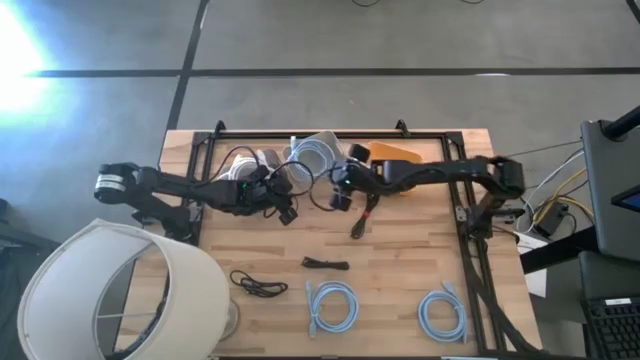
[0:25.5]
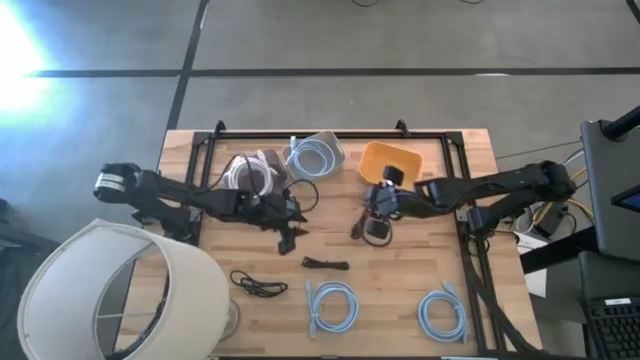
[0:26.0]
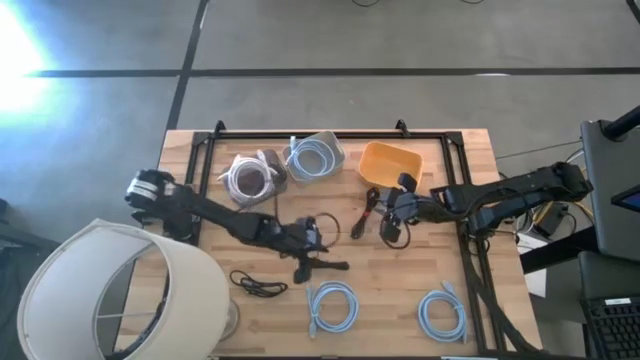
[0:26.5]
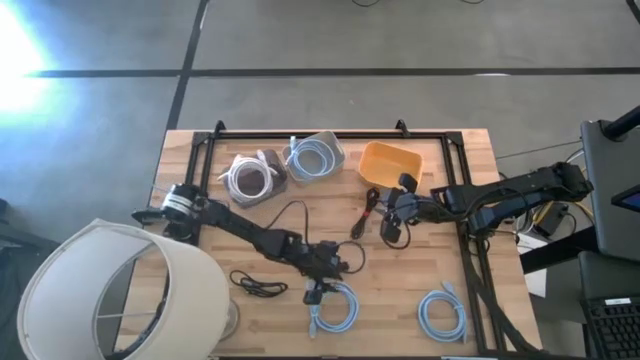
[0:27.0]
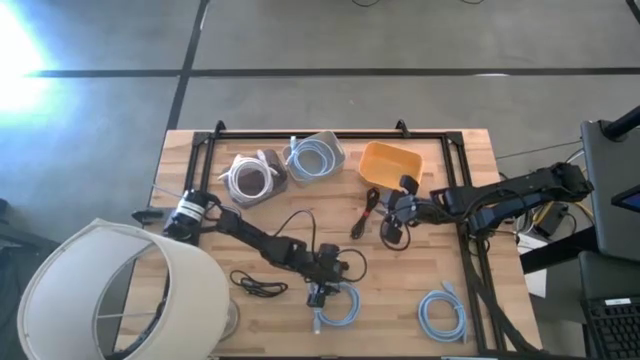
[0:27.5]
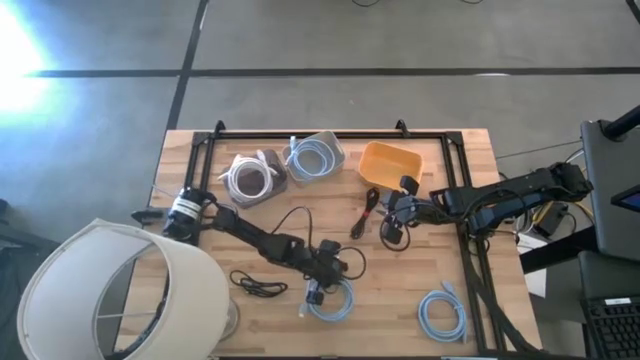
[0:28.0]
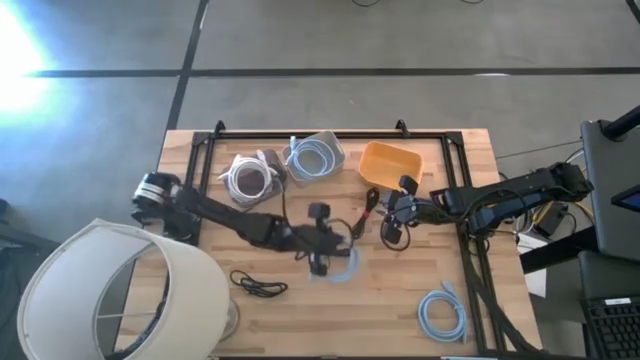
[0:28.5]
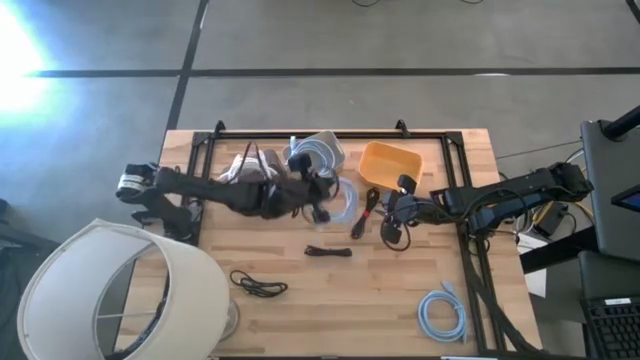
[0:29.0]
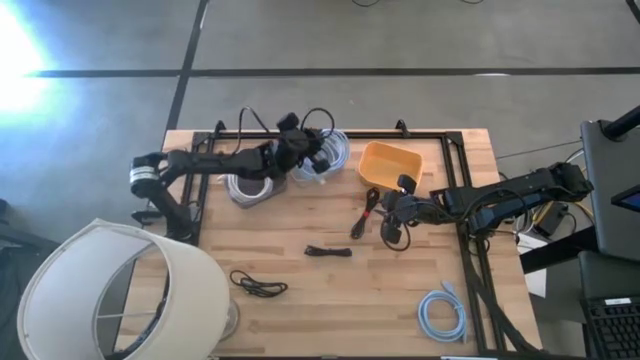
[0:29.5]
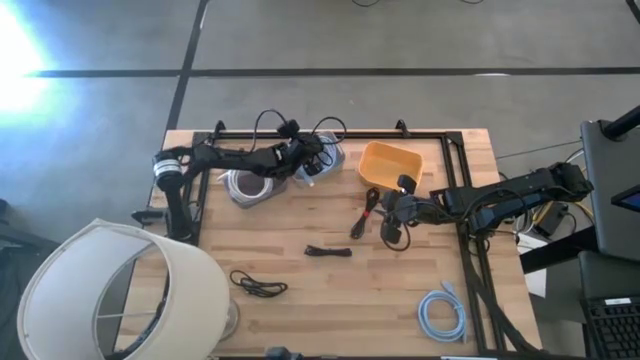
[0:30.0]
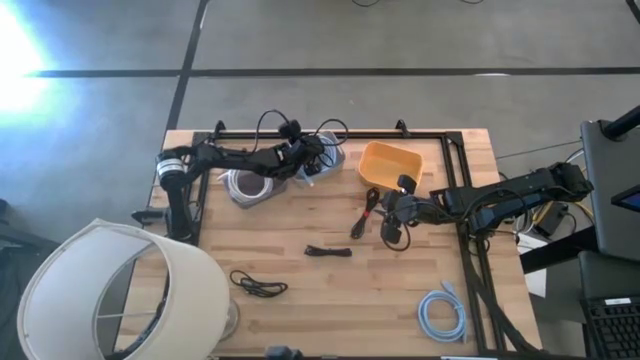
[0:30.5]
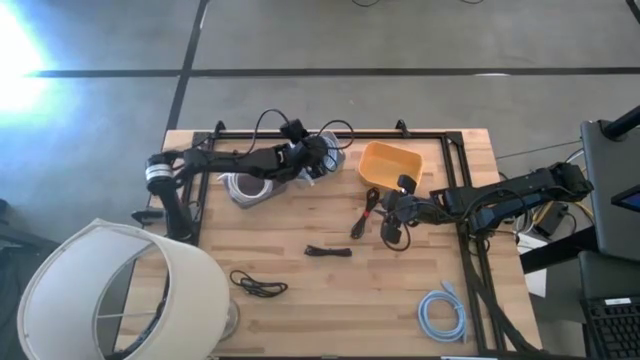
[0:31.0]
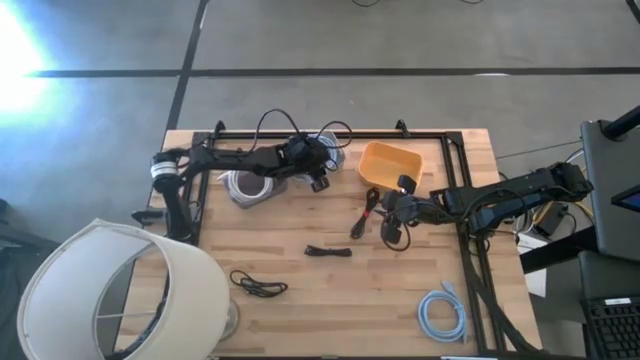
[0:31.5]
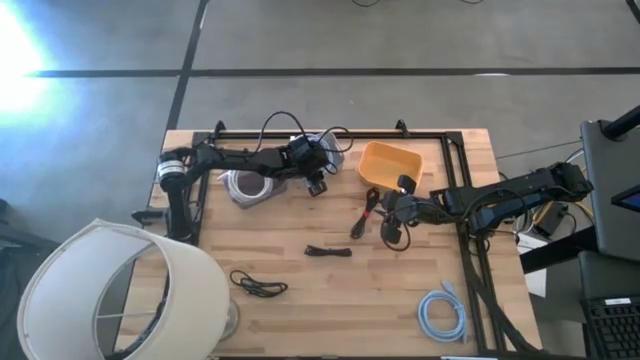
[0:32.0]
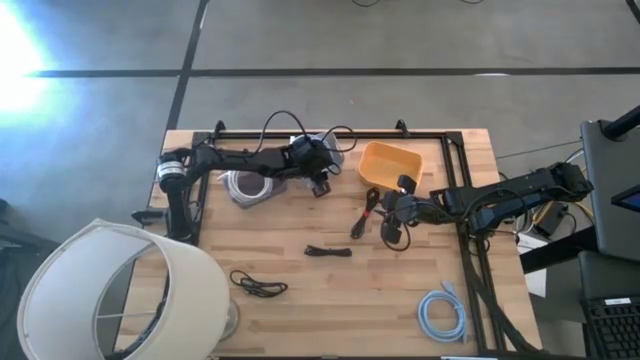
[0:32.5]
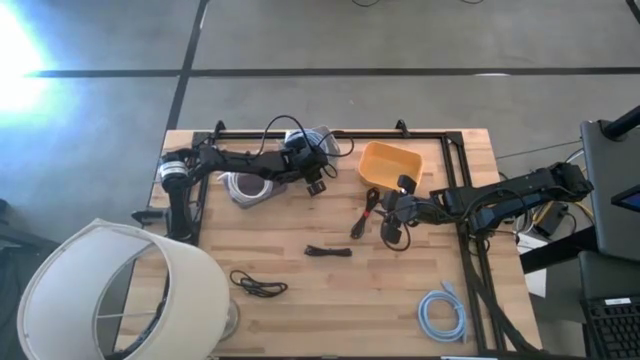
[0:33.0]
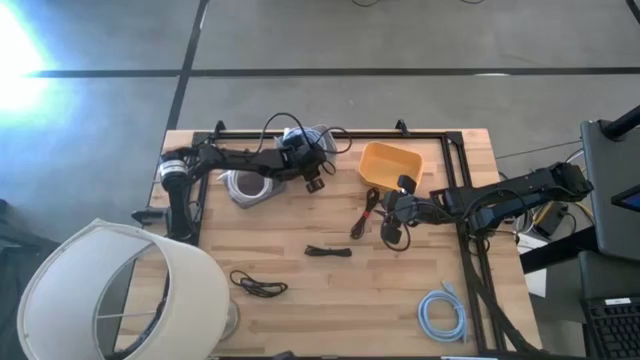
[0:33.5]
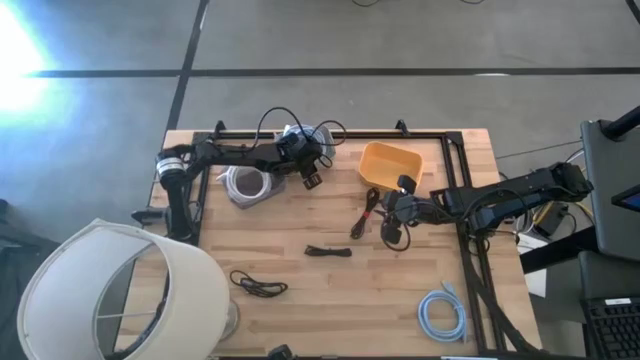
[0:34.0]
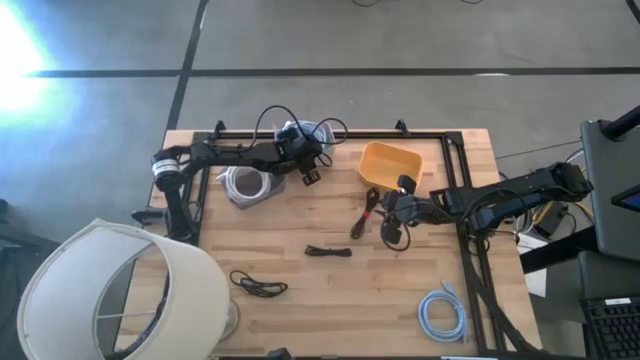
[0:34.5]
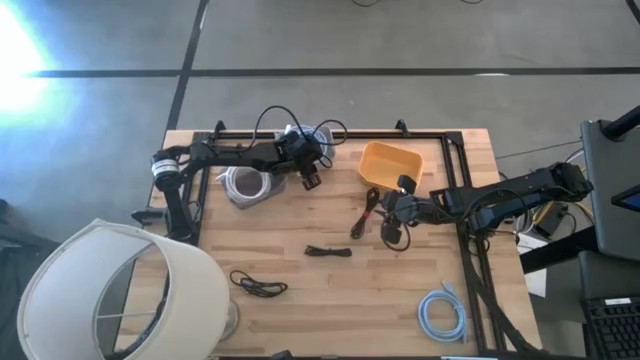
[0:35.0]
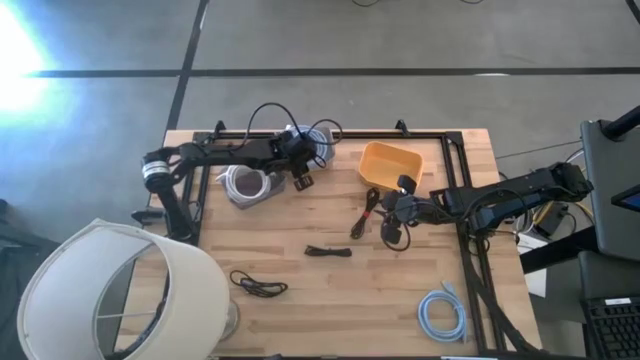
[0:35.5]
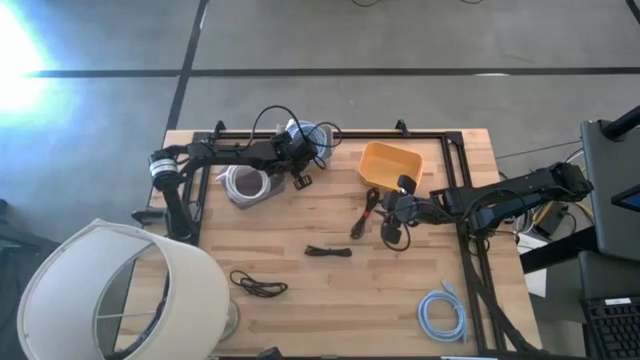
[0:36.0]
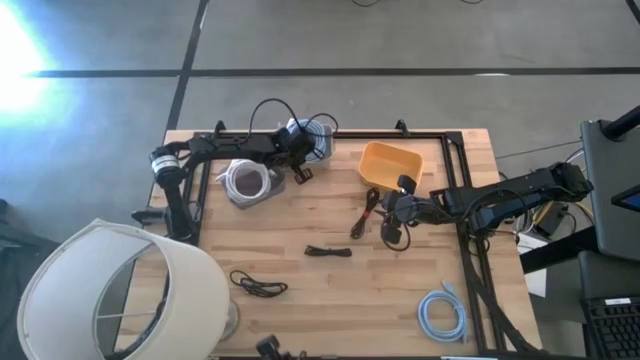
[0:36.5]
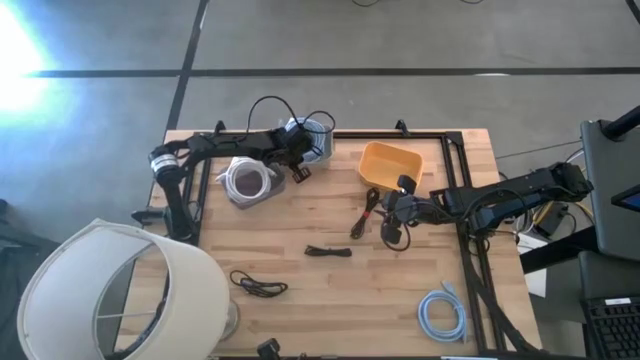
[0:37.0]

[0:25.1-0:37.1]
Task: Pick & Place USB Port
Put the left blue HDMI cable into the gray bin

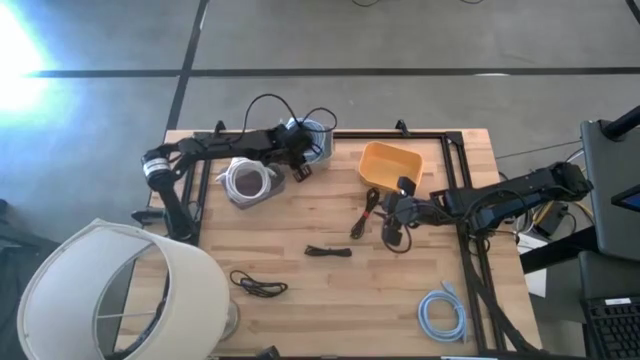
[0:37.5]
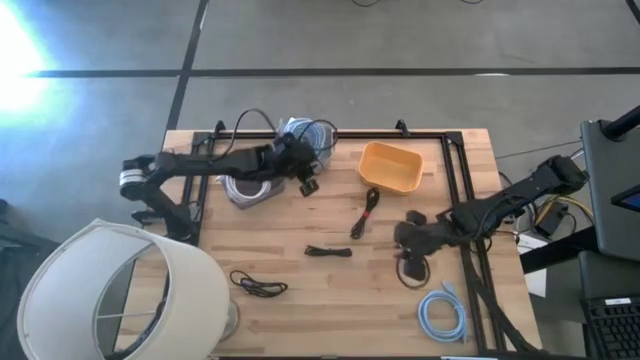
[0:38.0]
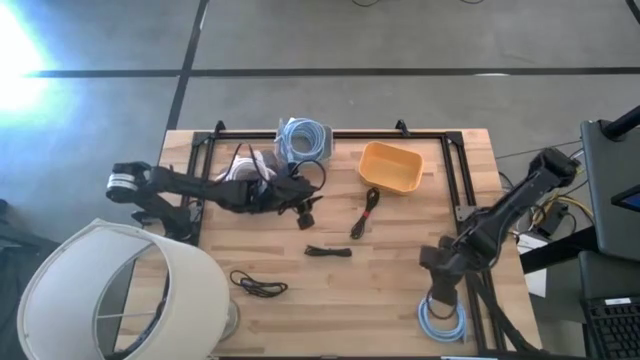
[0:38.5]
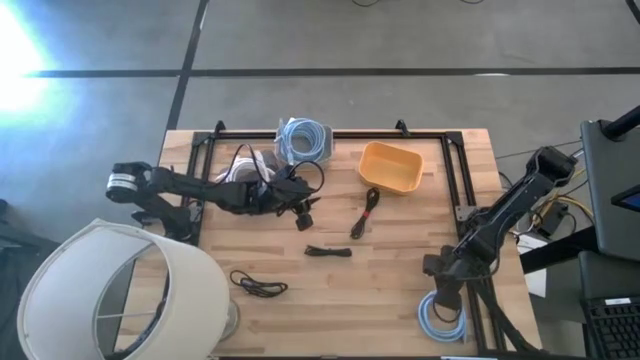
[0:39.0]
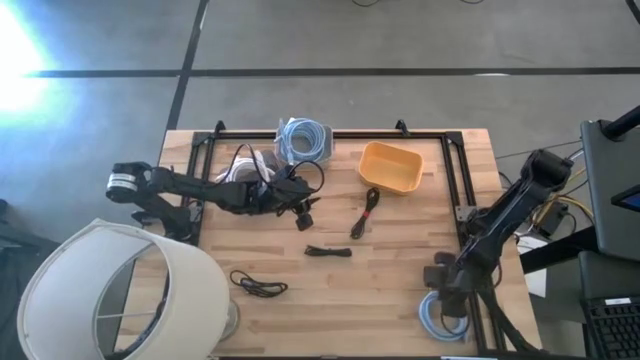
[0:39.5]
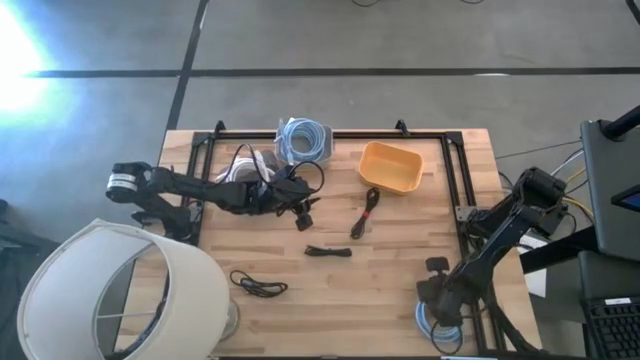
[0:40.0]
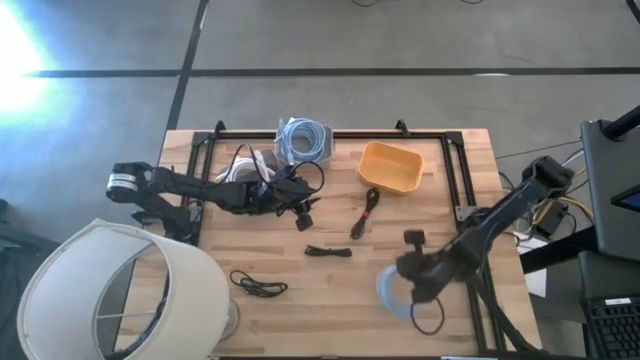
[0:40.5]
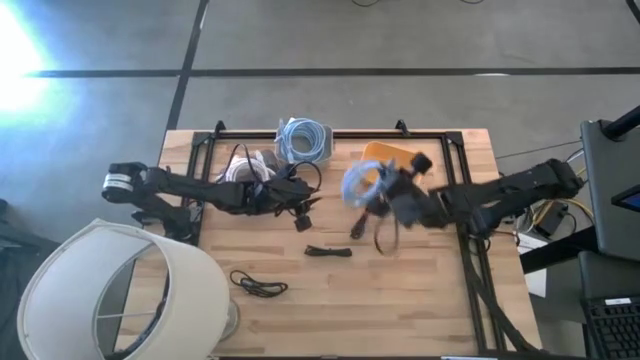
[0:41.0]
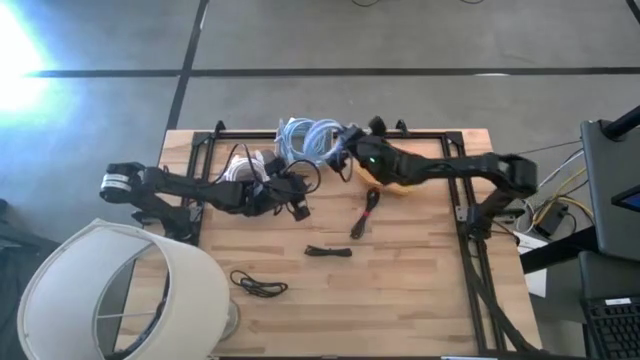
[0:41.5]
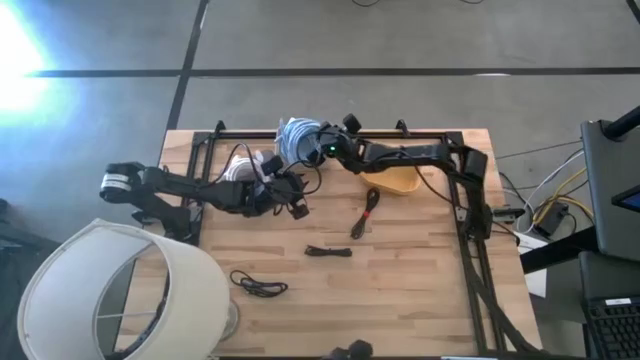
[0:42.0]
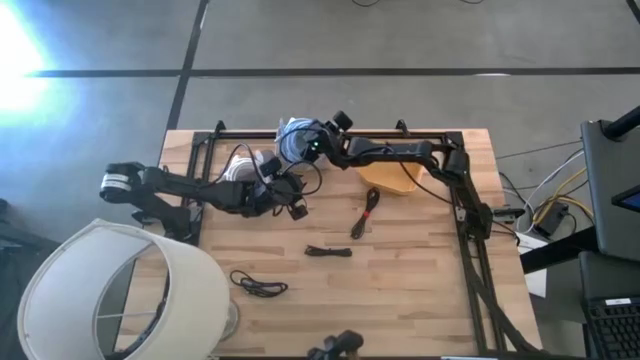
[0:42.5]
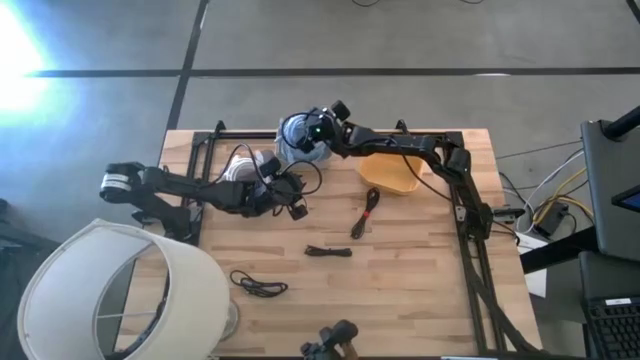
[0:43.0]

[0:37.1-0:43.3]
Put the blue HDMI cable into the gray bin

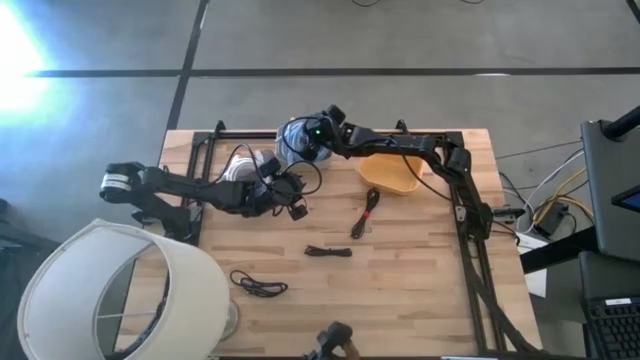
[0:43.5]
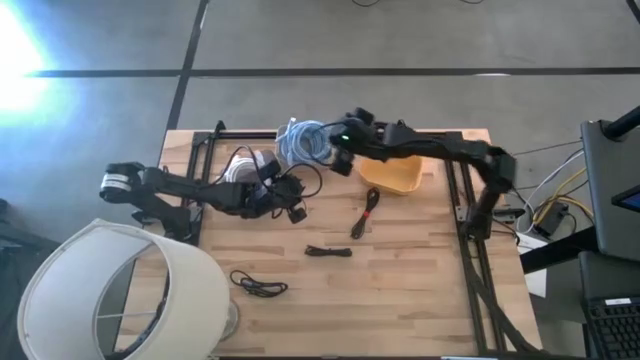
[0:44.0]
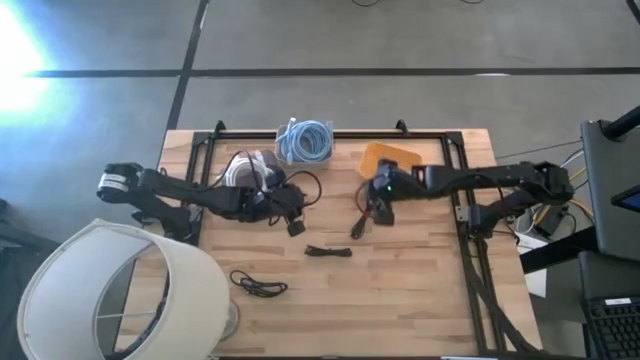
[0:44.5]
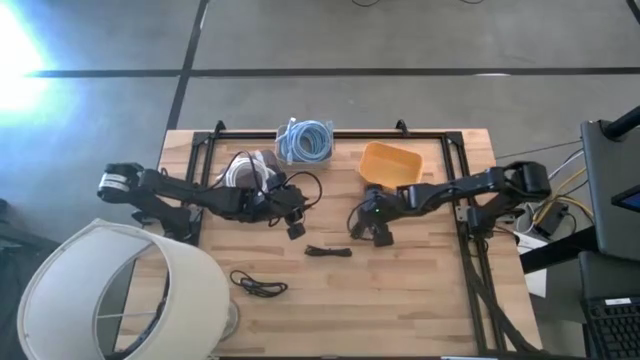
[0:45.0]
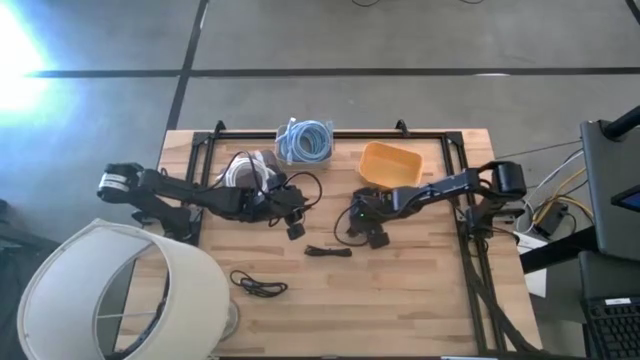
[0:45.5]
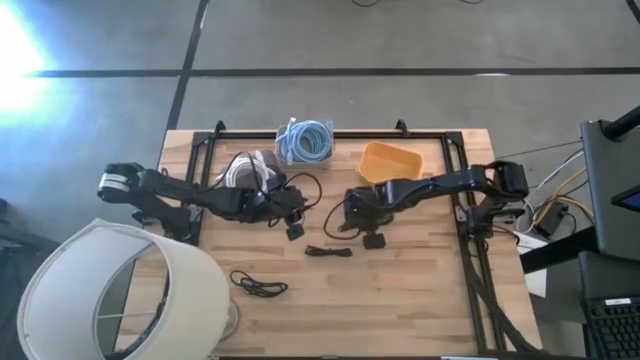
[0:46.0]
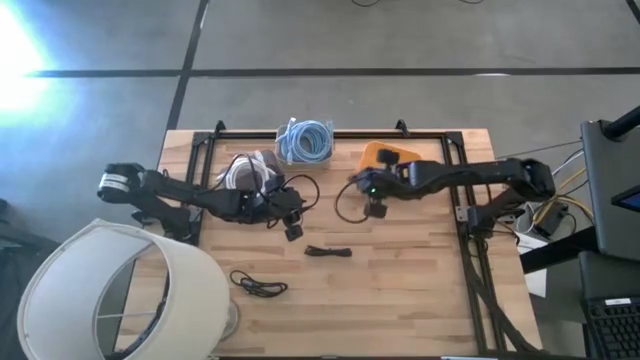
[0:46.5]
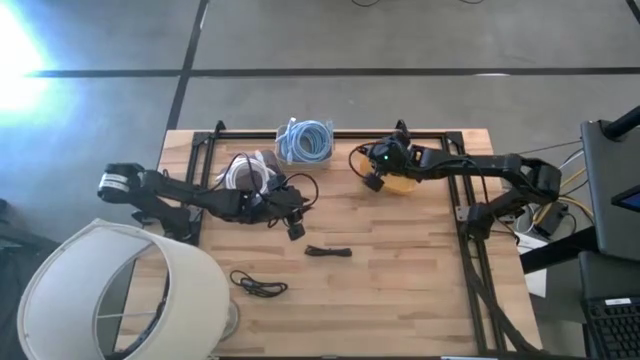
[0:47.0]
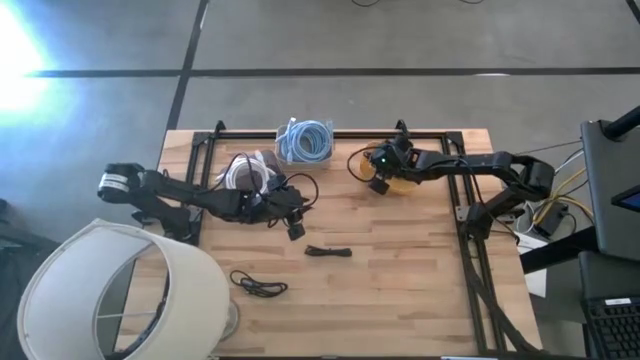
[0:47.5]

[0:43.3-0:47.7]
Put the top black USB cable into the yellow bin

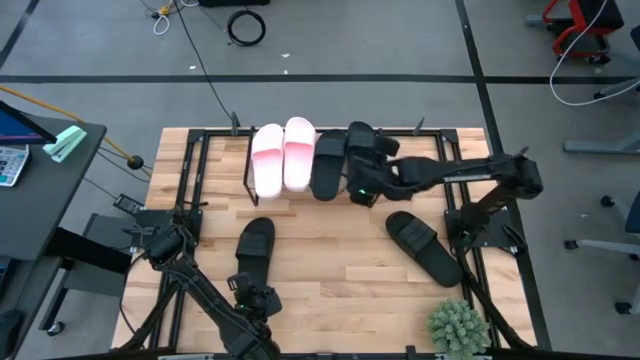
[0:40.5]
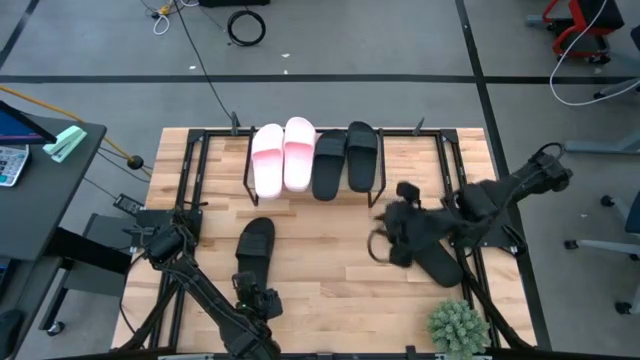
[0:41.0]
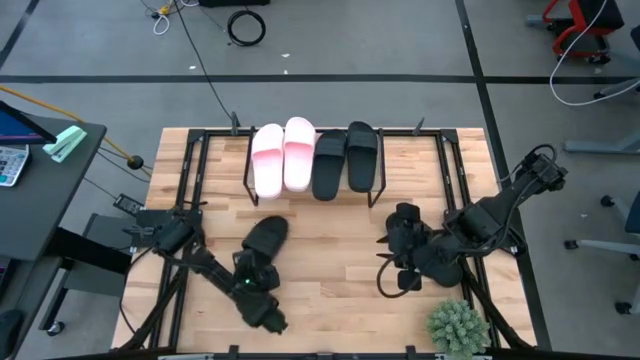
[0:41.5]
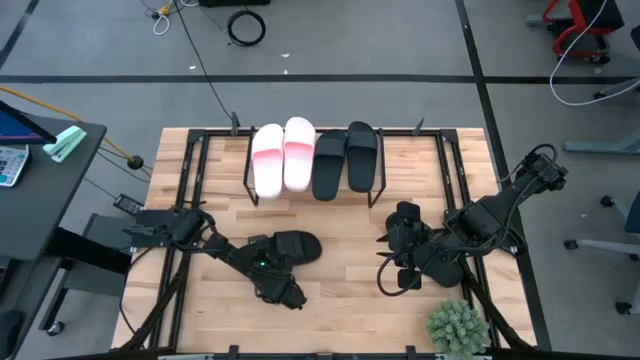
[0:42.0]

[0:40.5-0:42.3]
Task: Pick and place slides into the shelf
Move the right black slipper under the shelf
